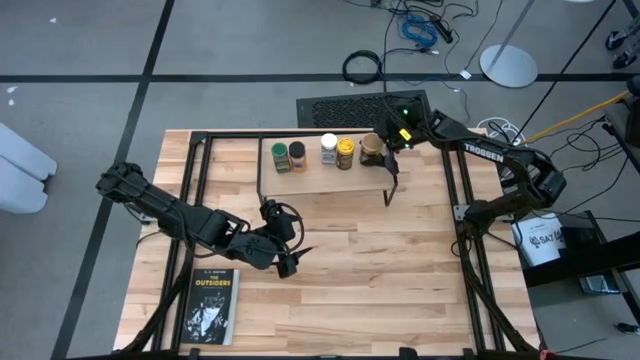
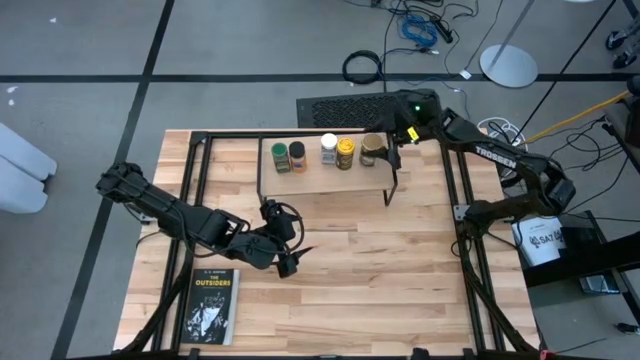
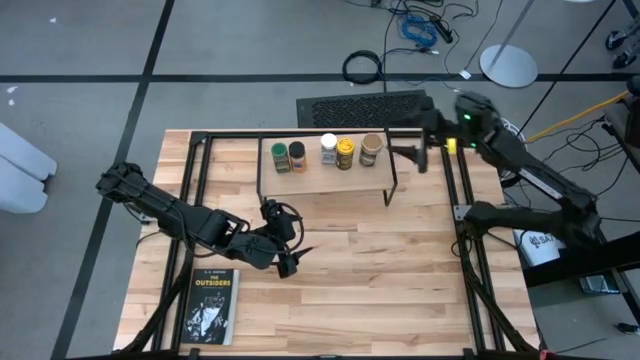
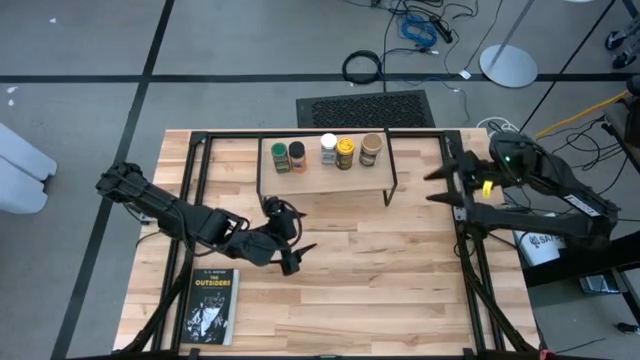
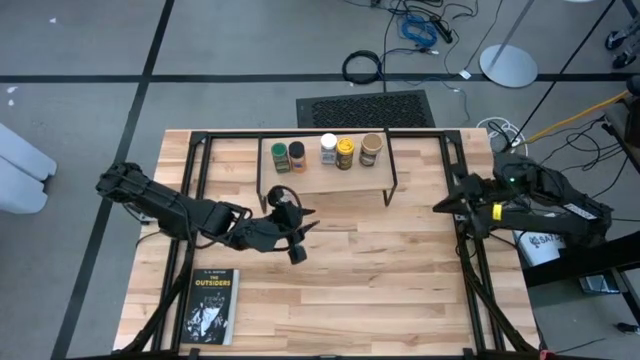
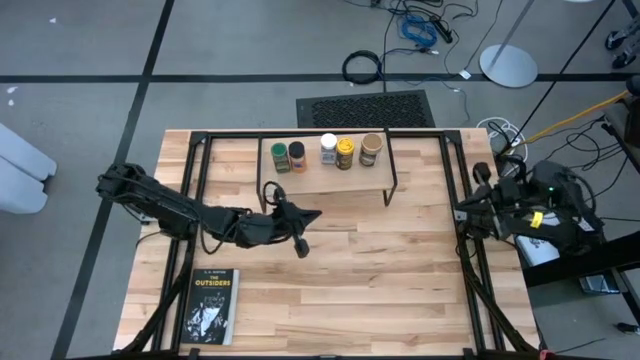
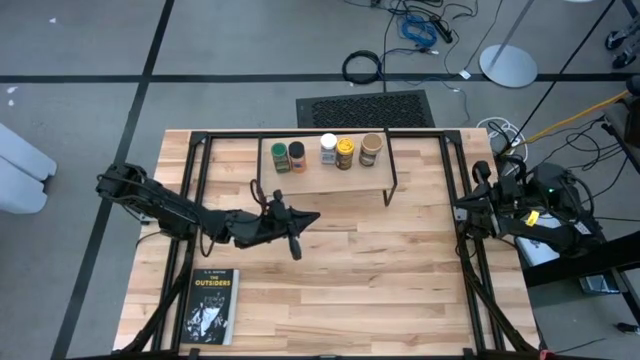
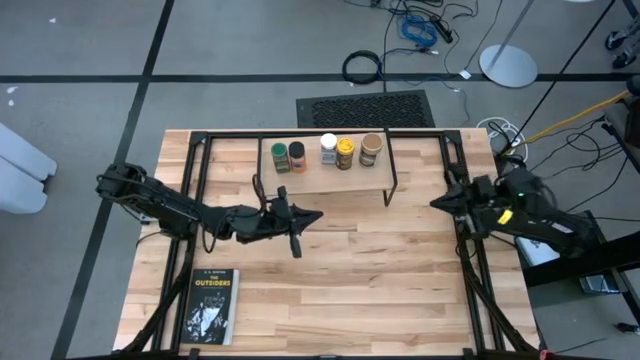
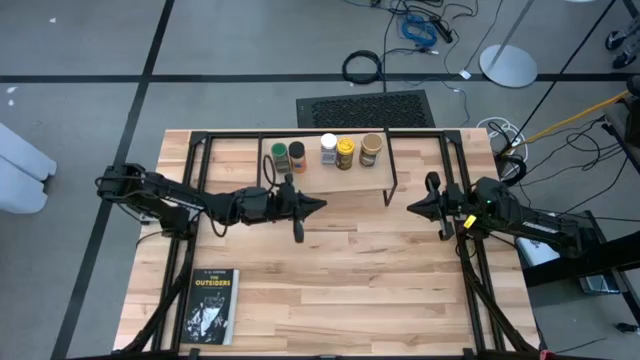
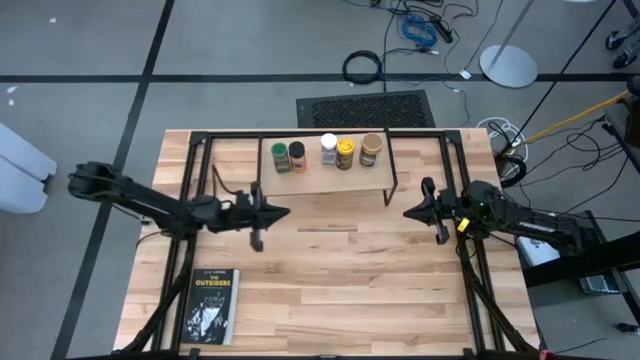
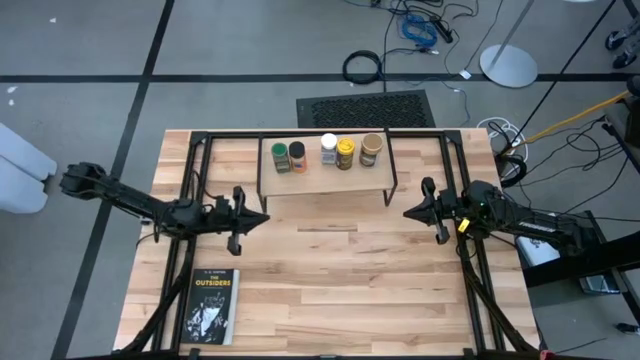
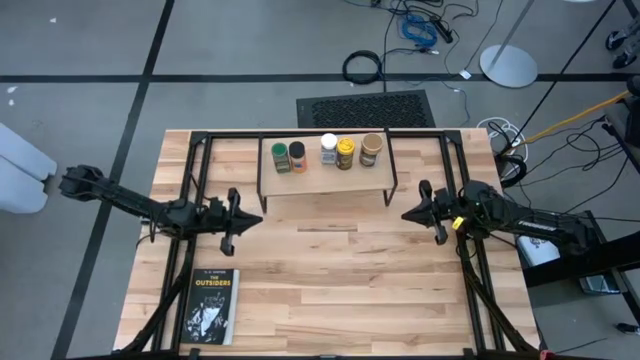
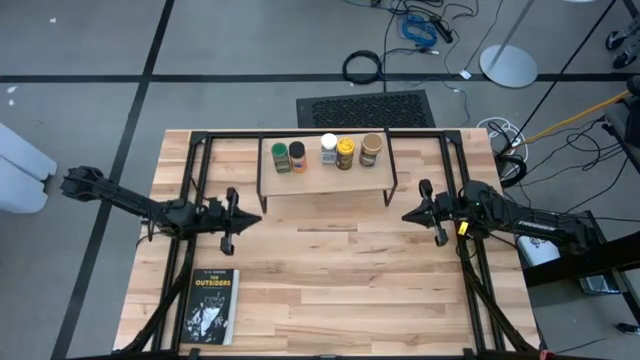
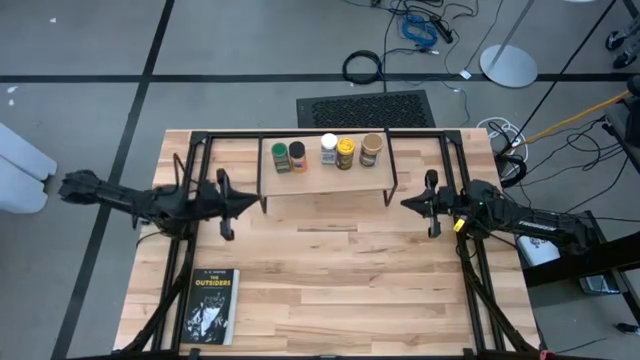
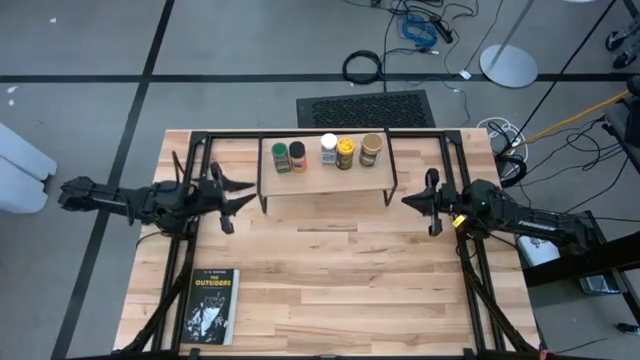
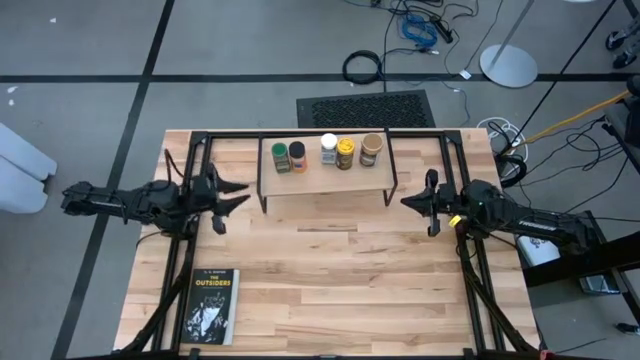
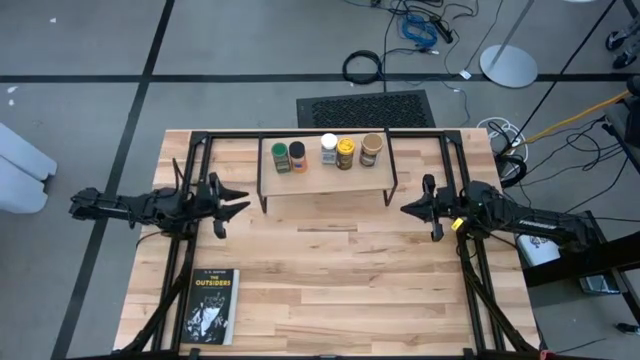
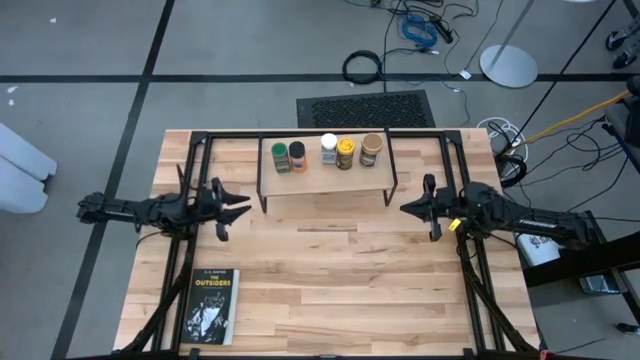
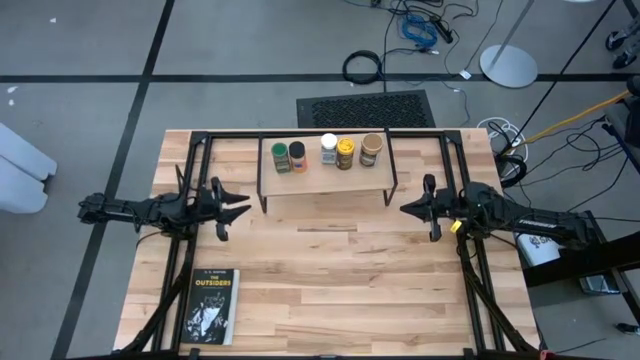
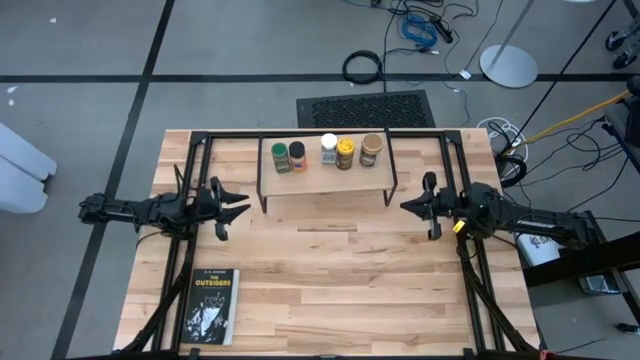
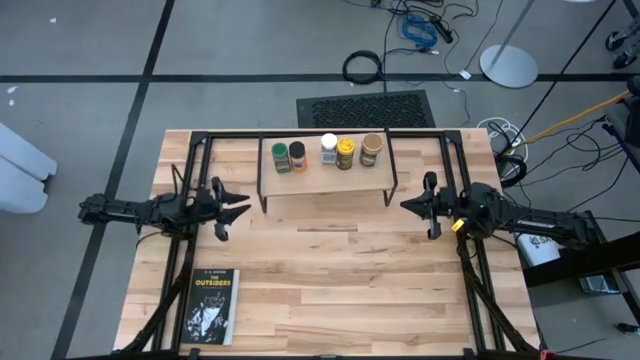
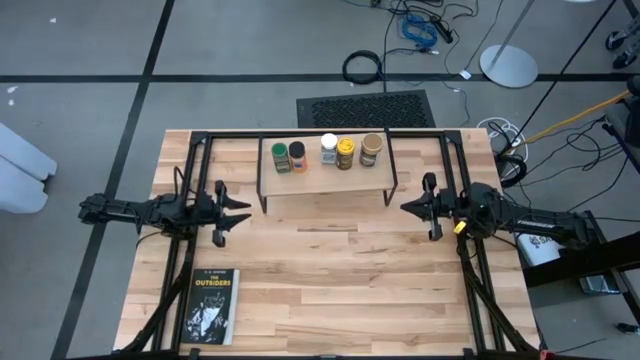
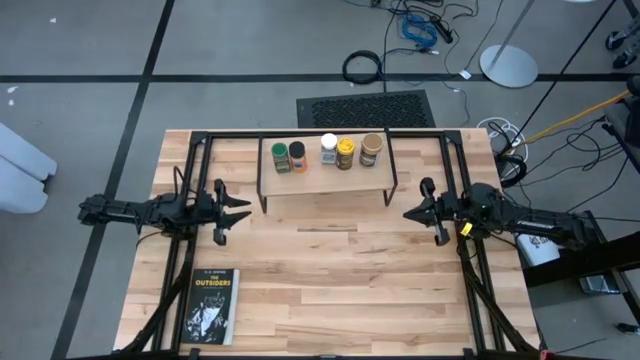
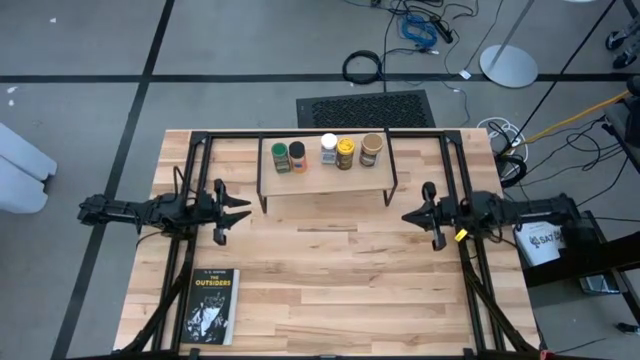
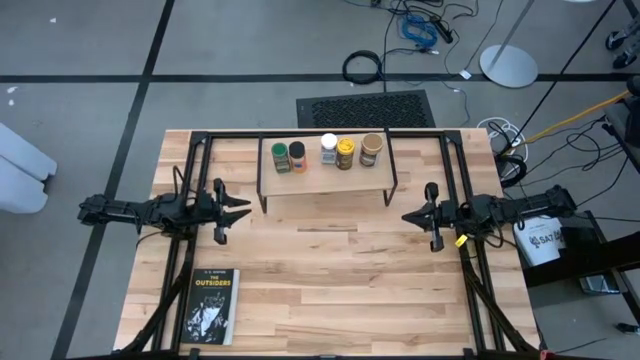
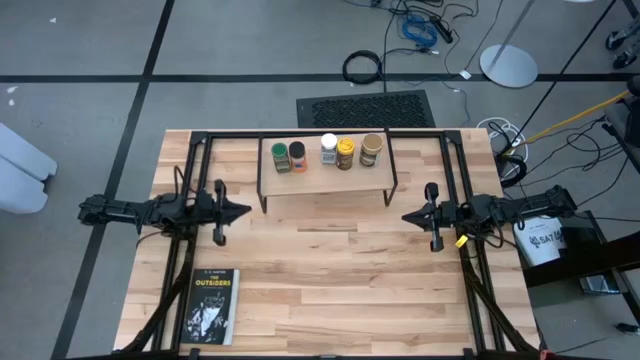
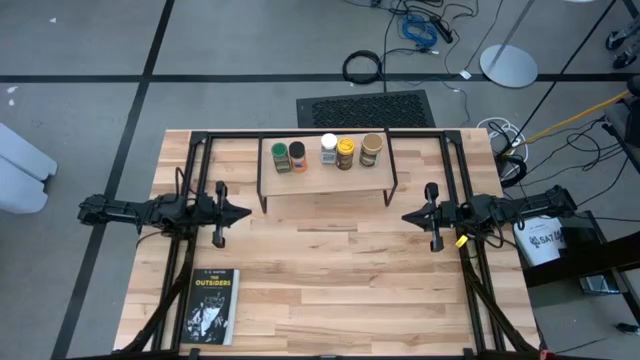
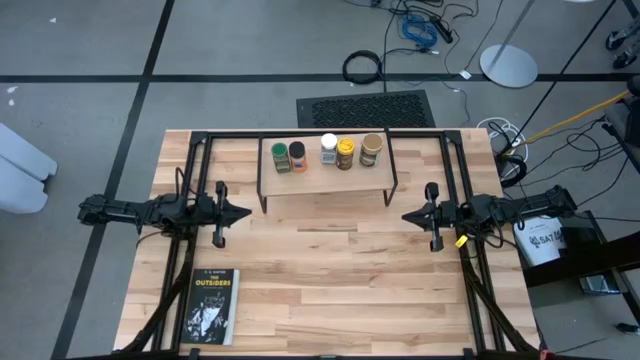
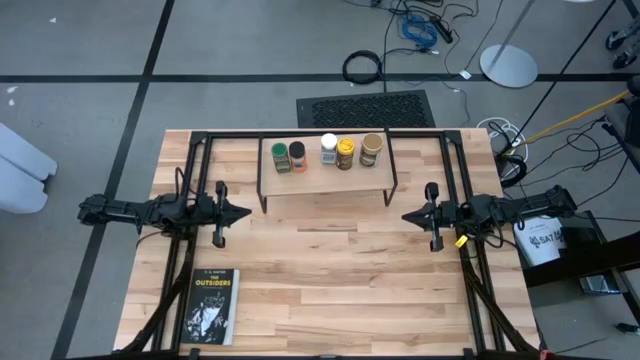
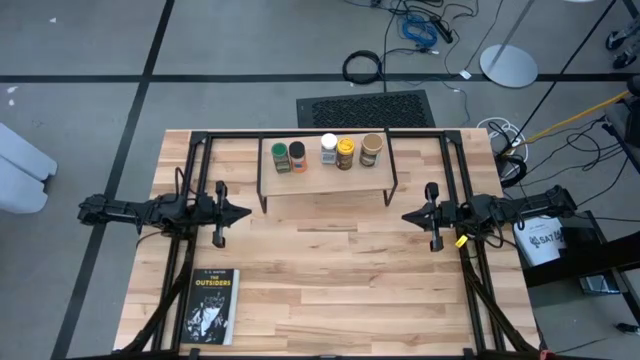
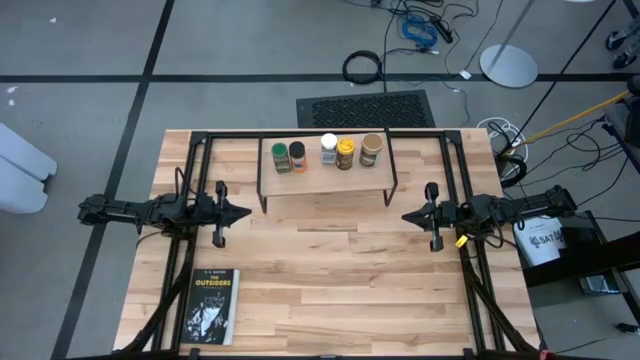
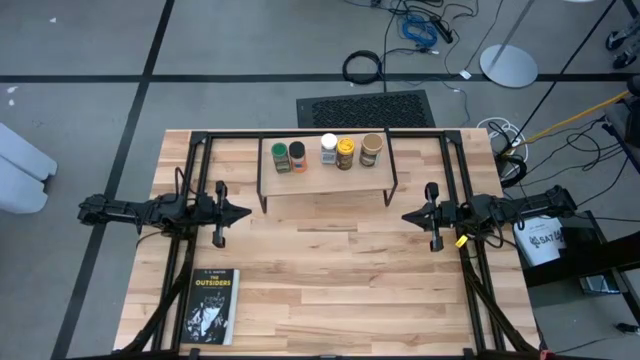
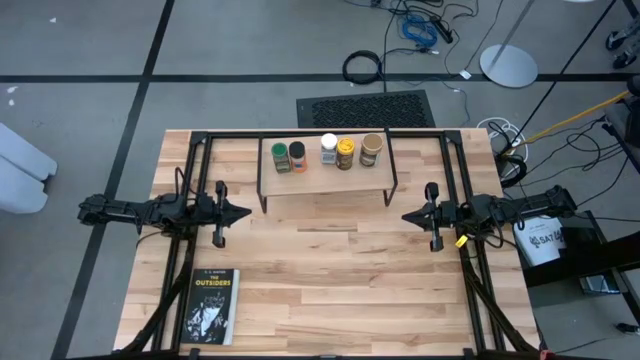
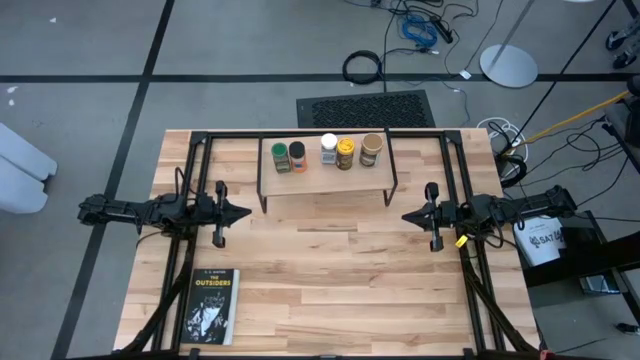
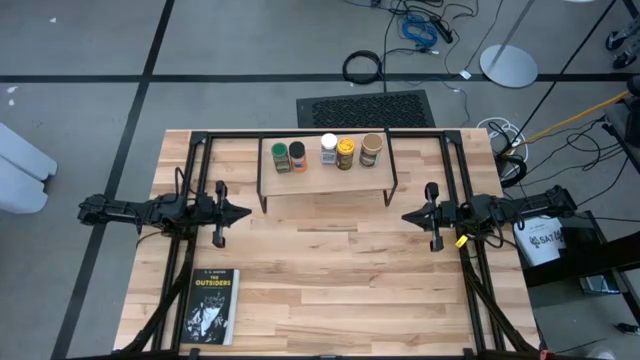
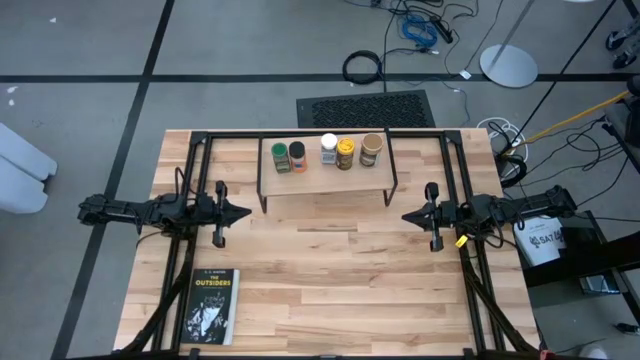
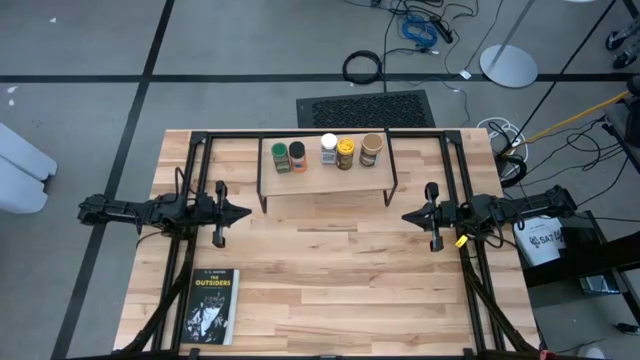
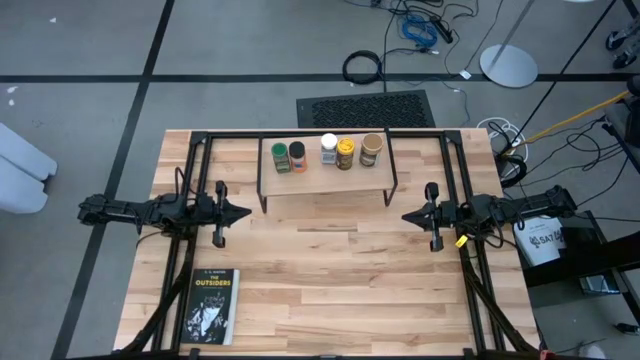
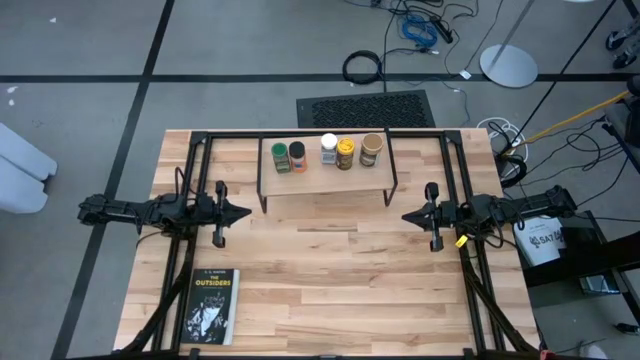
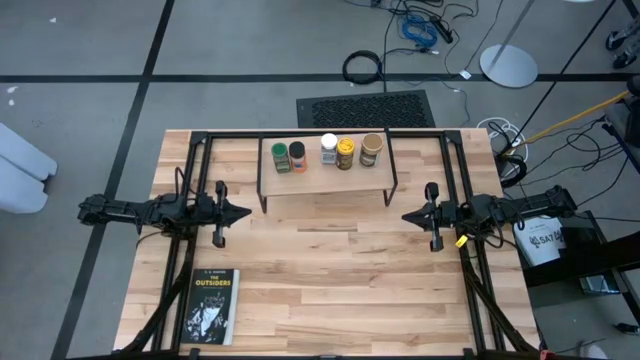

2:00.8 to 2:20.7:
Task: Shelf spices
Return to Home Position
